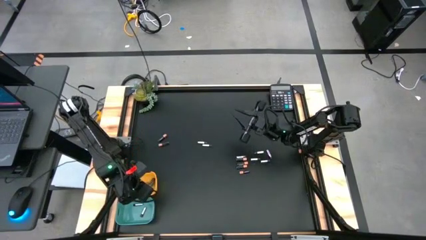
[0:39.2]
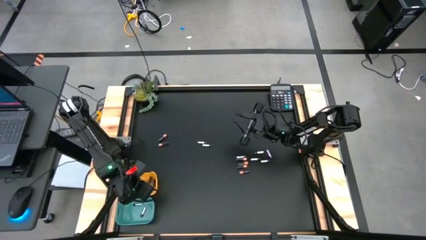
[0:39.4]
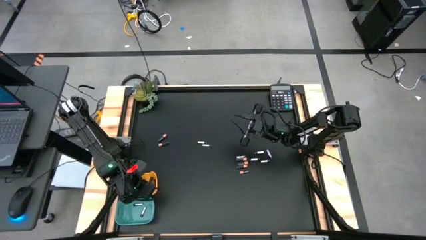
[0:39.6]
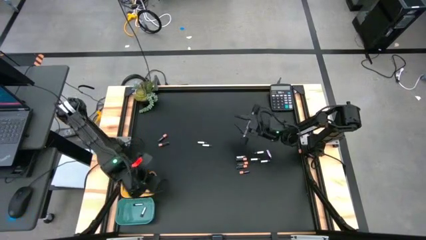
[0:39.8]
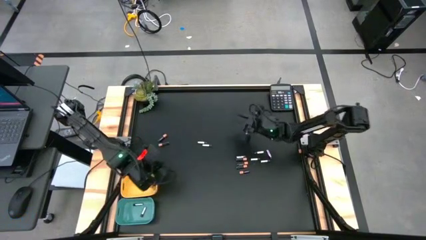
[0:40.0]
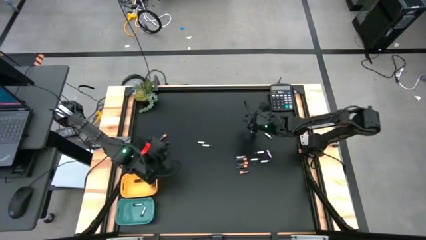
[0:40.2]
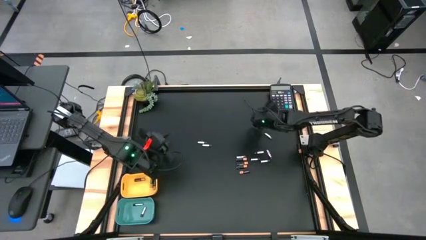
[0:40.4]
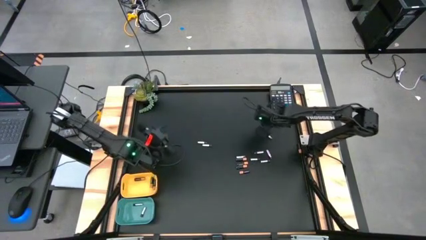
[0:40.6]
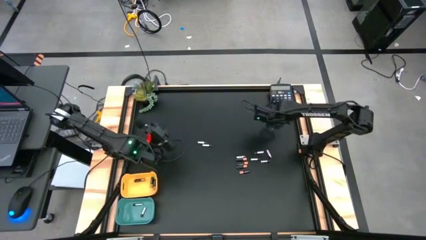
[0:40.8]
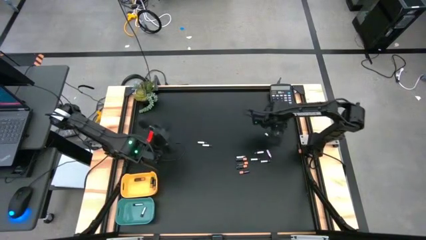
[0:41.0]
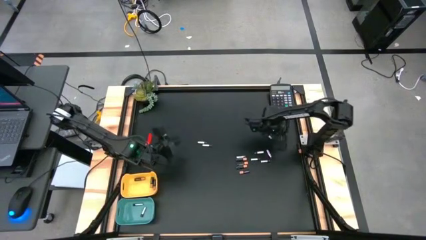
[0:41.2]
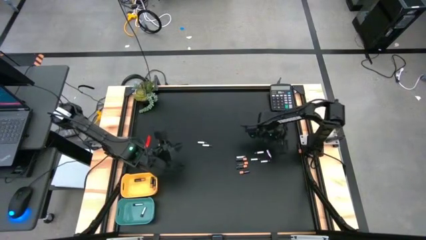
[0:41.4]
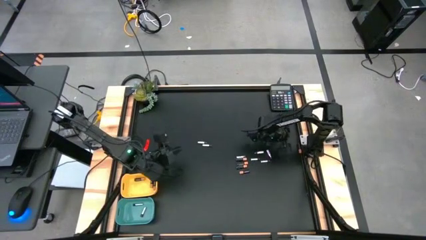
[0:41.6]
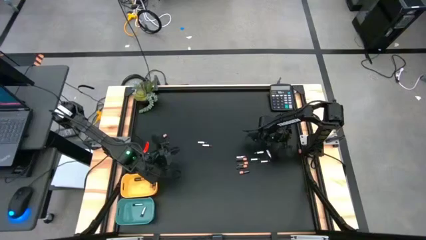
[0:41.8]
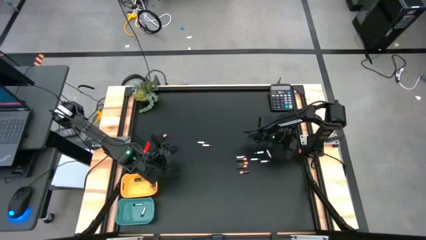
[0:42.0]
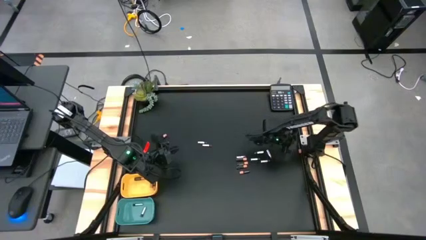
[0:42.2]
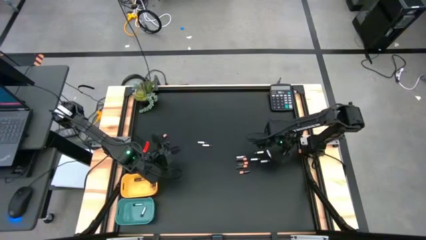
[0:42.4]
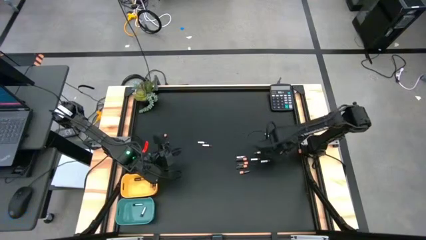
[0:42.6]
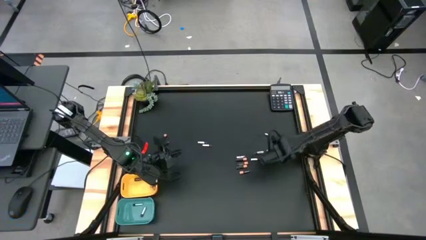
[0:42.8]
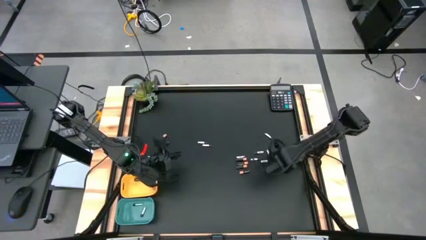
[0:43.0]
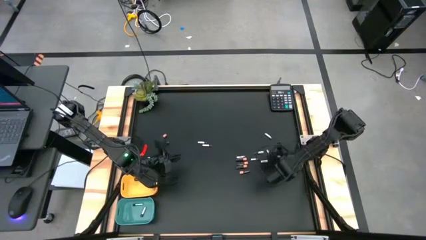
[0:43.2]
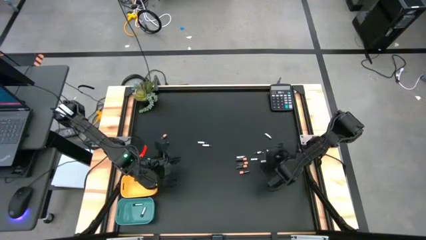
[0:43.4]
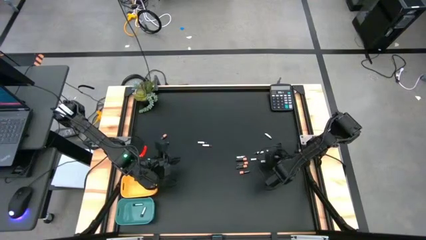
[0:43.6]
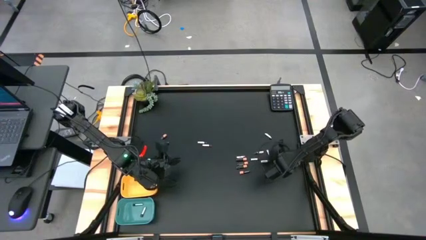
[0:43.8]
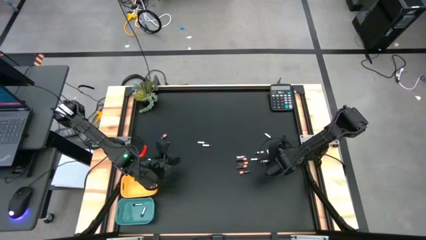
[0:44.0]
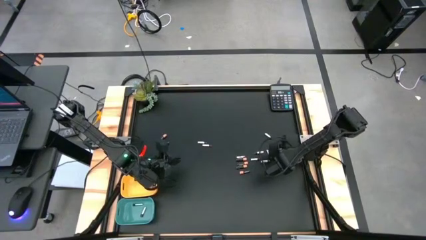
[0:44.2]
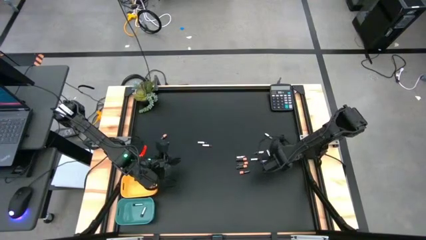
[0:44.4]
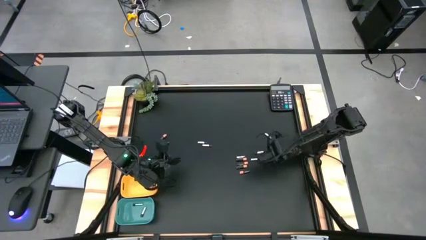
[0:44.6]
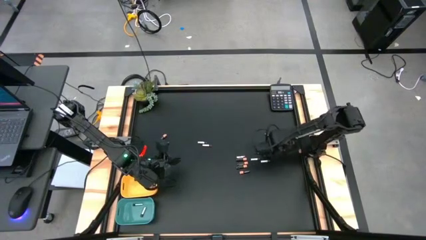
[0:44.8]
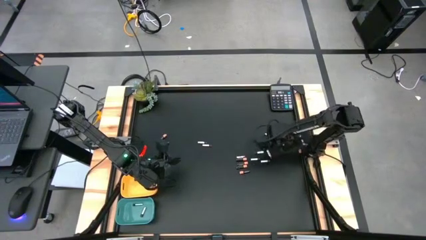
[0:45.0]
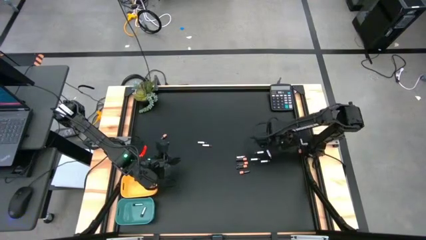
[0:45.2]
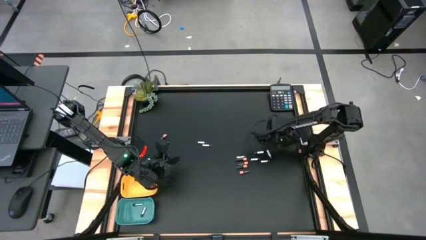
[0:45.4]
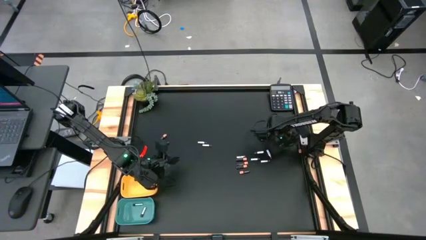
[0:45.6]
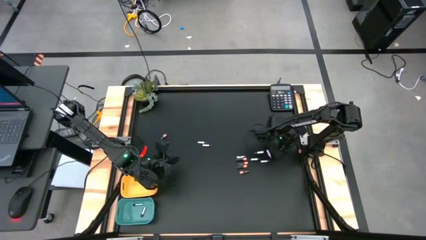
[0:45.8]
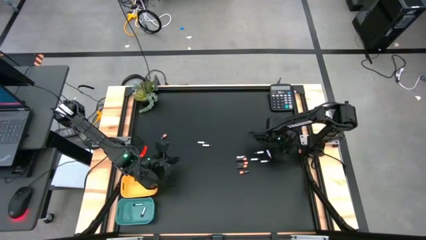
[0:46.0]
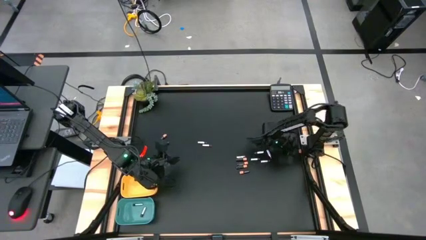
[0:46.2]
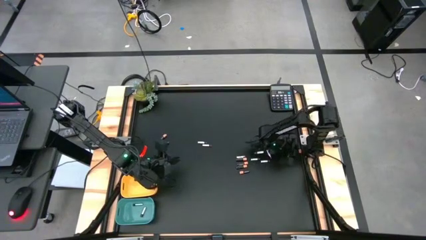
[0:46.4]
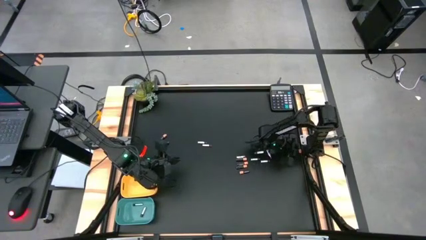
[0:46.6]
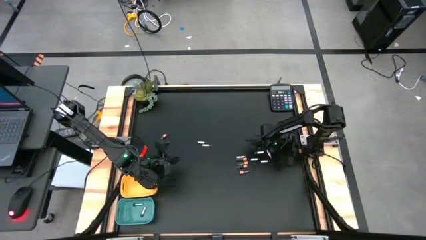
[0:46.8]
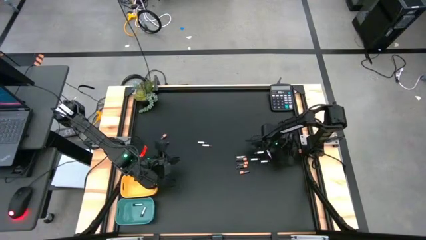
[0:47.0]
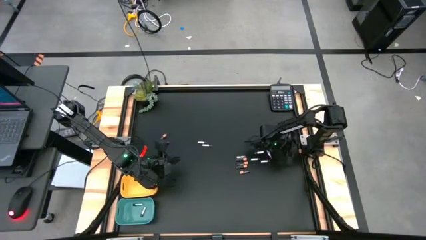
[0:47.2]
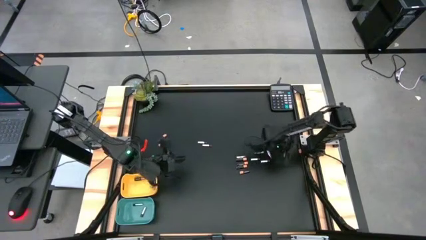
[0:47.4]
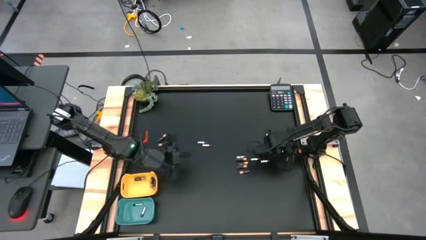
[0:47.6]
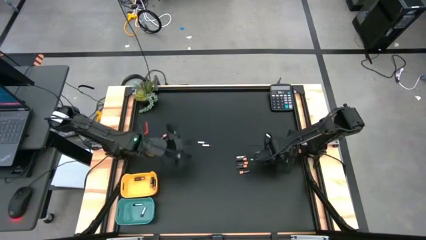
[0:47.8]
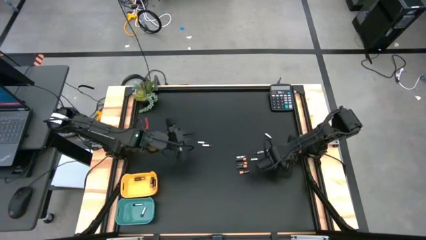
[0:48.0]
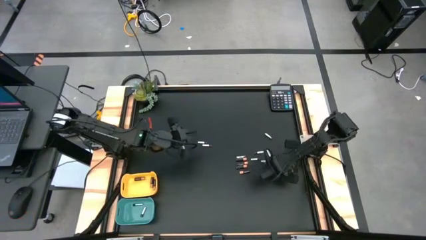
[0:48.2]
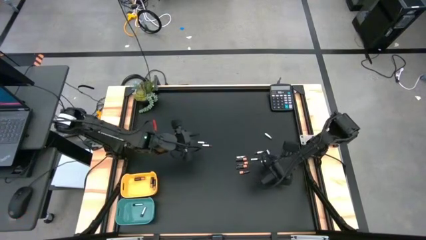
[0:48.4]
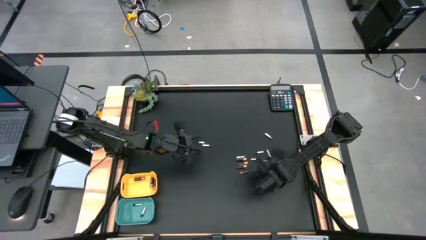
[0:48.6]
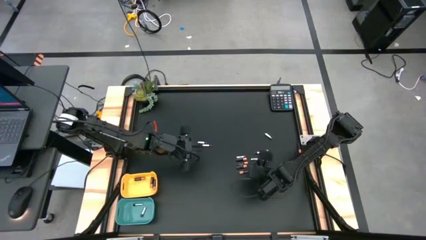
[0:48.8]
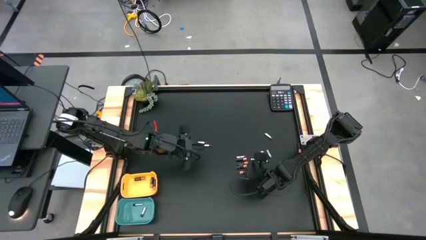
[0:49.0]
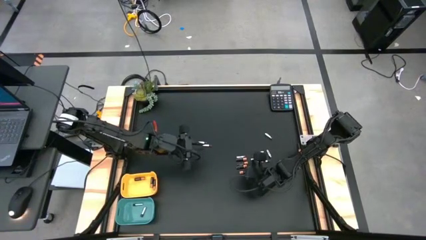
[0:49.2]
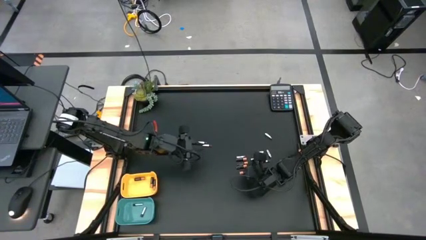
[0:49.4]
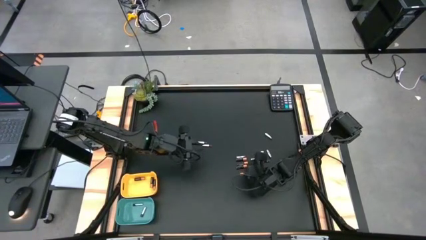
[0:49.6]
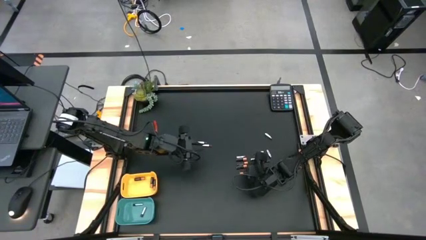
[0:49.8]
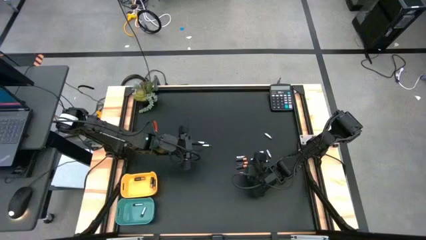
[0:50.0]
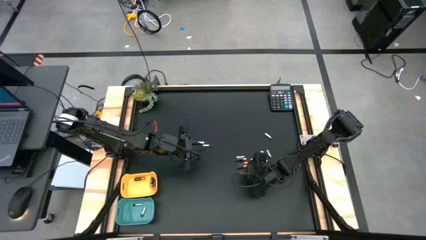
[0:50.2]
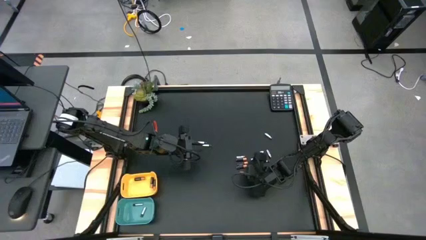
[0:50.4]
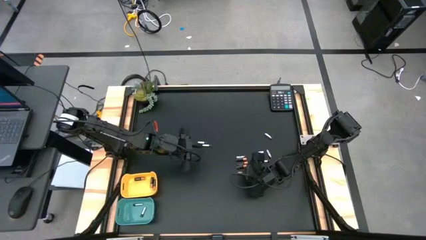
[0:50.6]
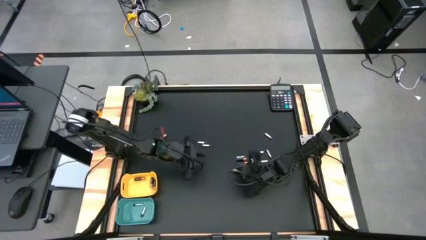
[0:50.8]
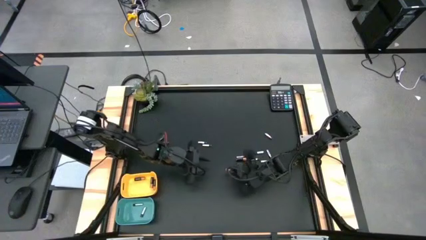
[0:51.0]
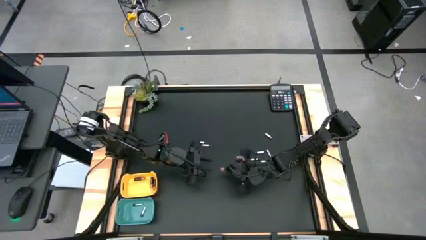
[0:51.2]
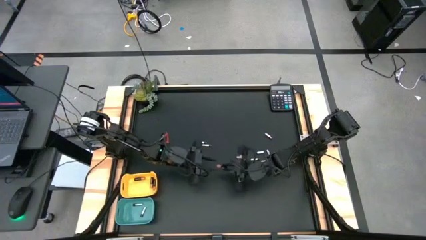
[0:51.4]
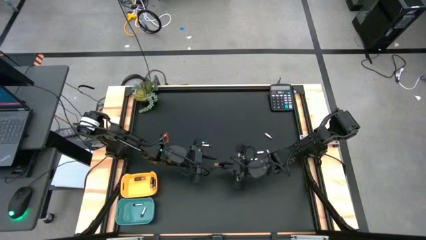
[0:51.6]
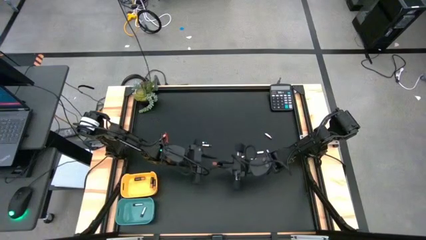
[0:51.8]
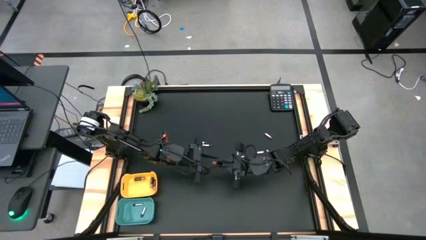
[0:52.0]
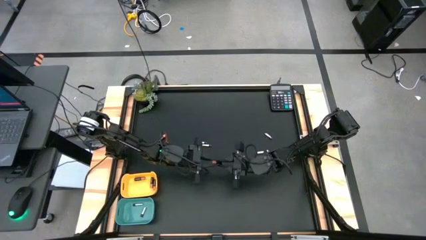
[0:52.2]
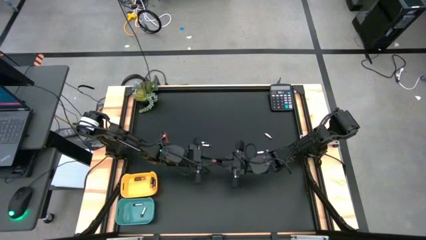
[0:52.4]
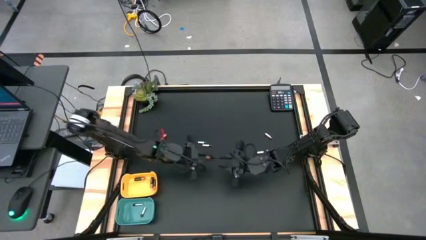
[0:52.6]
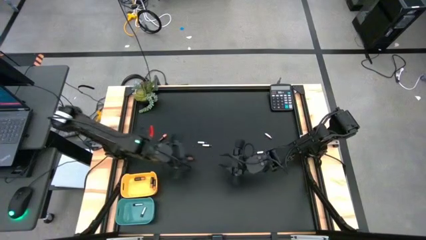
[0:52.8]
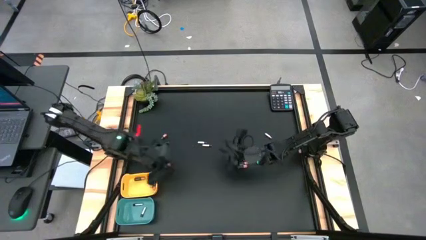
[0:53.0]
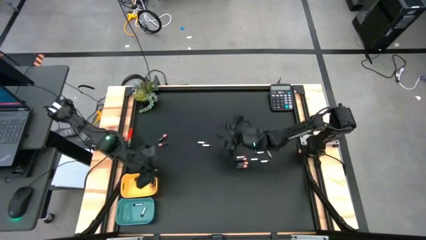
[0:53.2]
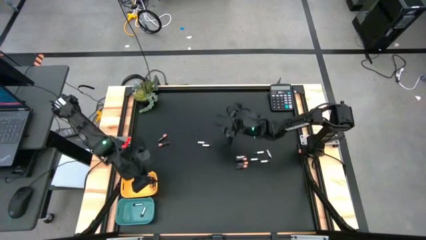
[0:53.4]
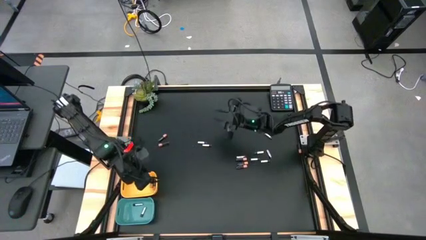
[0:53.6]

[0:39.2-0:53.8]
Task: Sort batteries
Put the black battery into the yellow bin

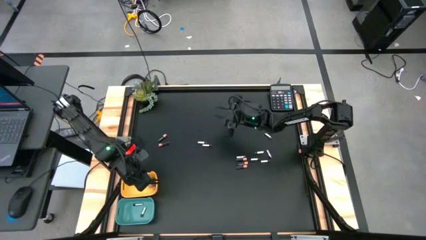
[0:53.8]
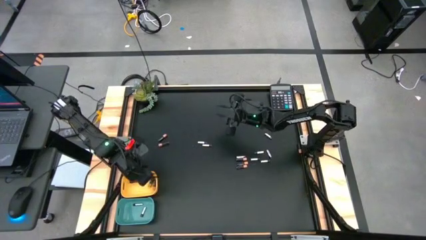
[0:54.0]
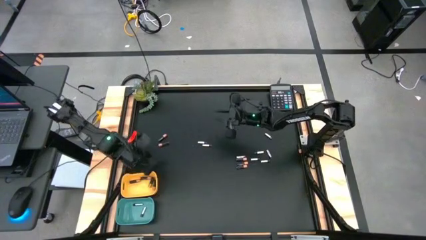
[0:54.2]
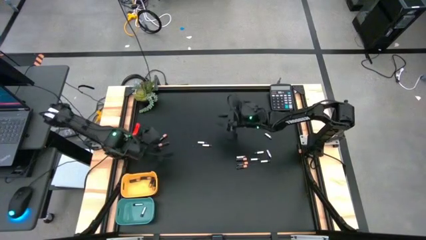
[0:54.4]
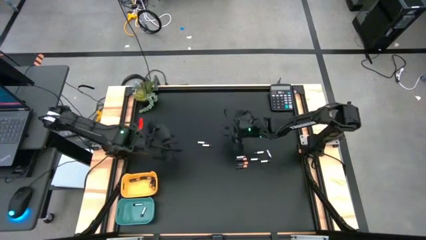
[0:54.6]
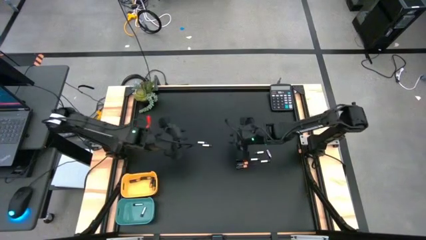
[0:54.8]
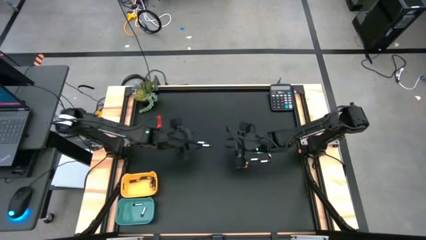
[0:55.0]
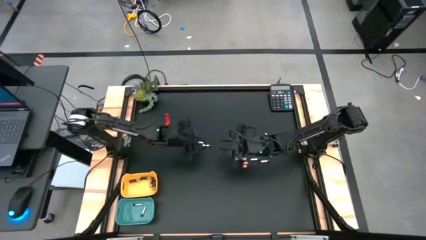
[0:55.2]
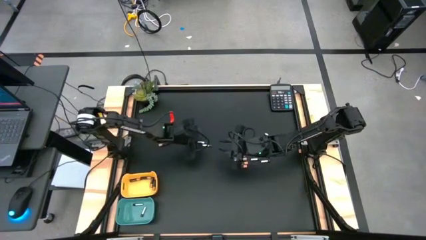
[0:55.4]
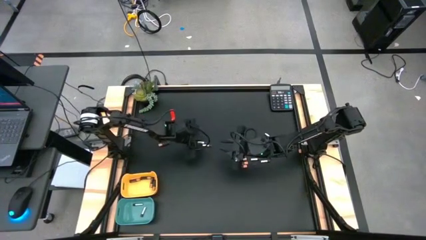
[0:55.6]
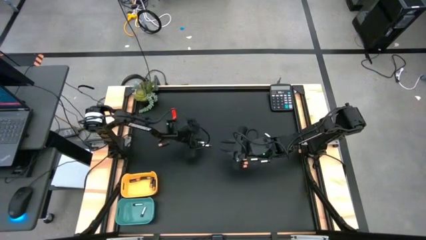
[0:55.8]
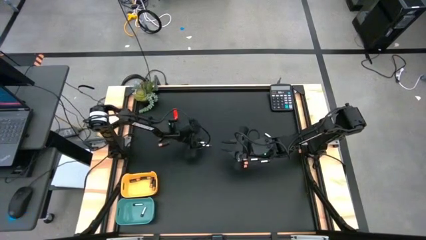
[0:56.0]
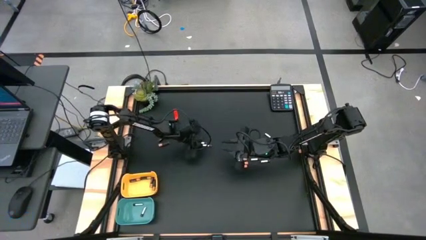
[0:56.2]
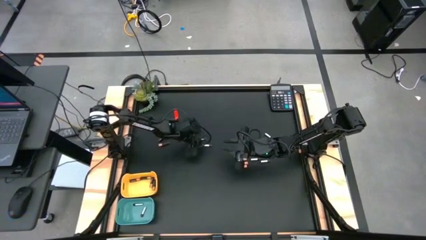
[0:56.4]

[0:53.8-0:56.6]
Put the silver battery into the green bin
